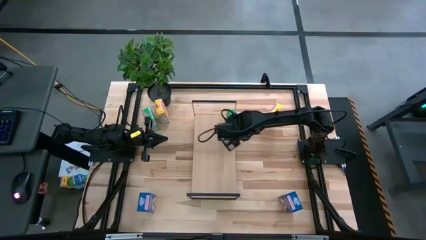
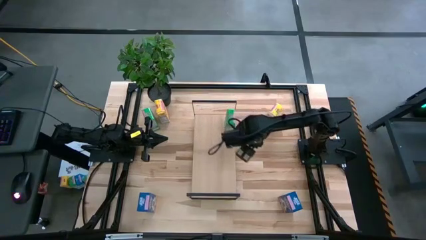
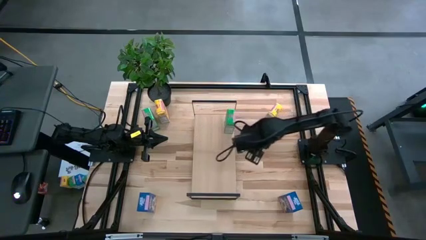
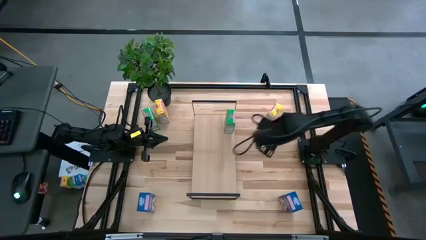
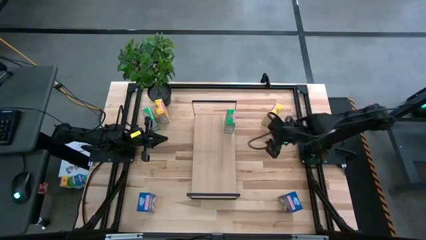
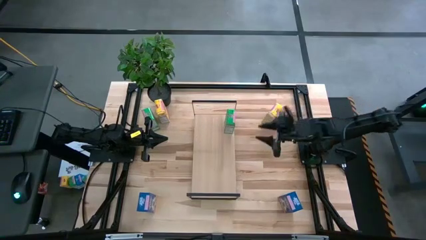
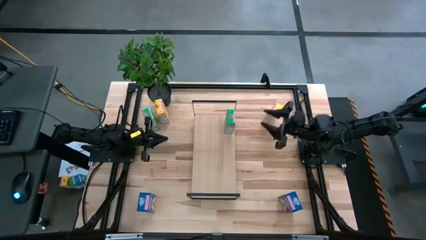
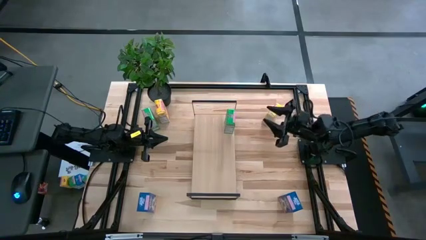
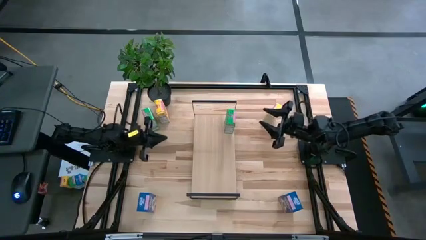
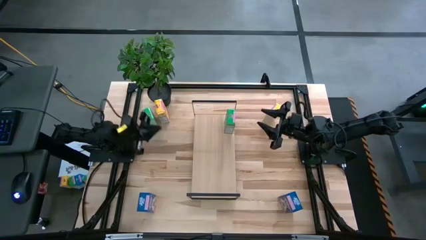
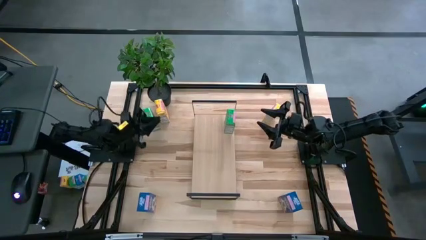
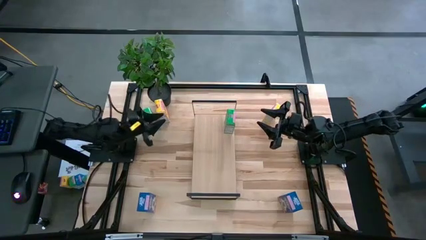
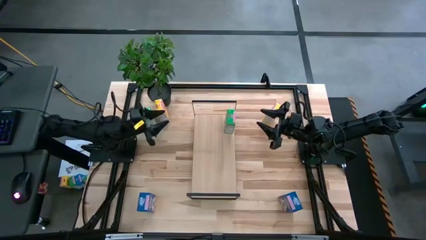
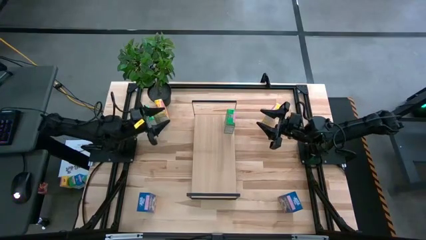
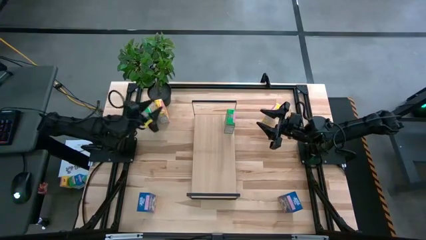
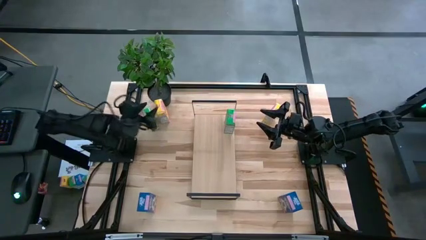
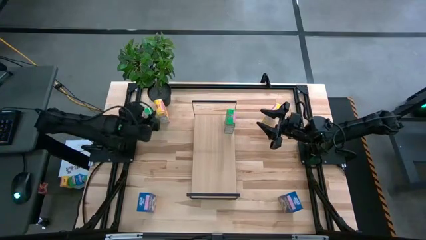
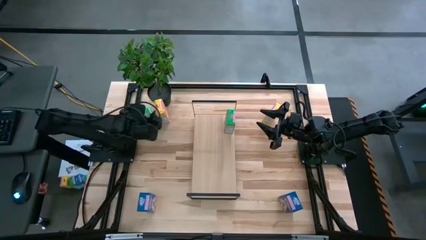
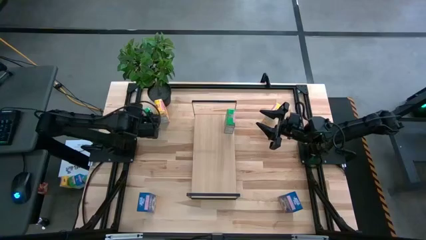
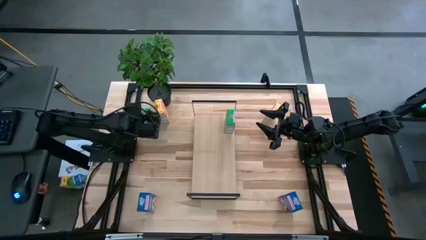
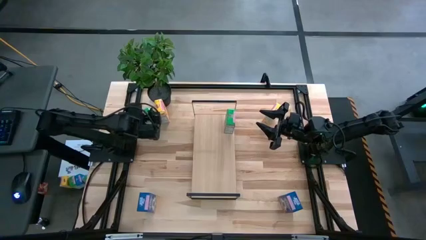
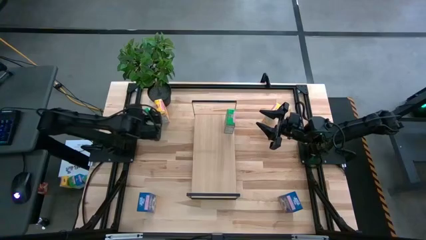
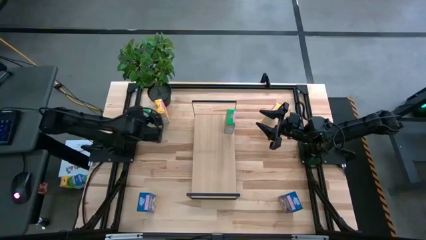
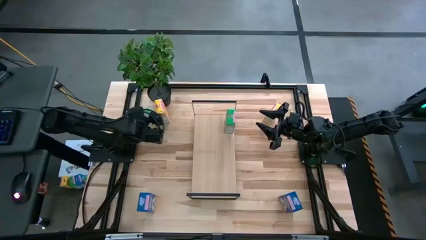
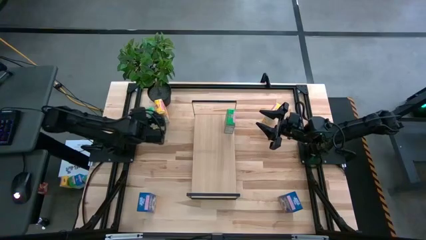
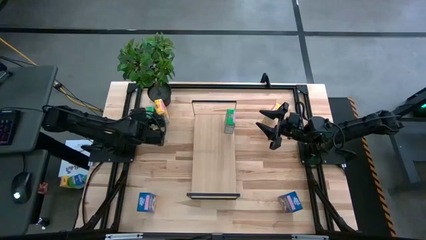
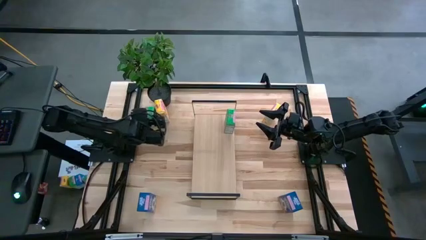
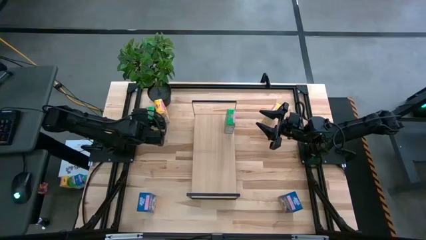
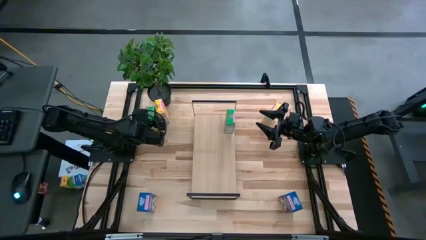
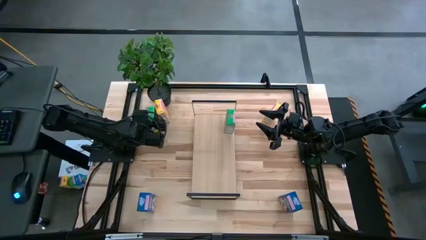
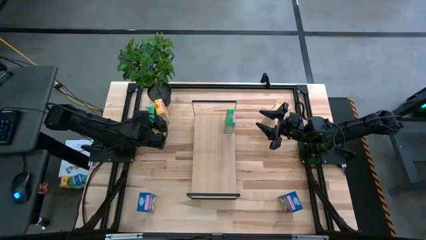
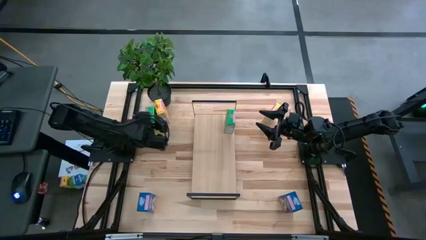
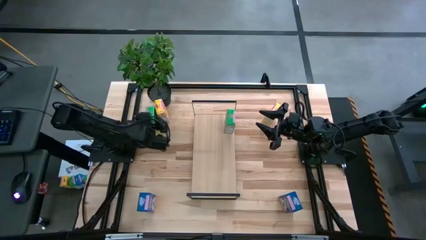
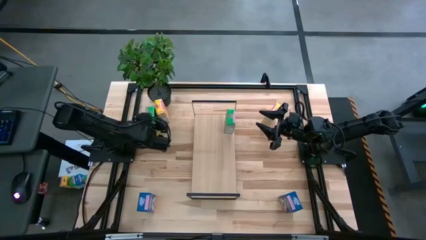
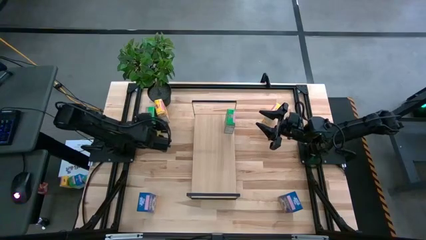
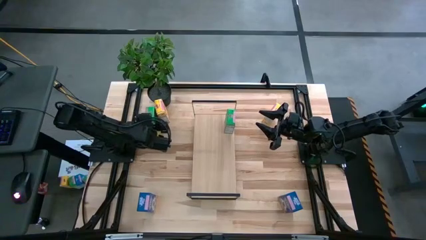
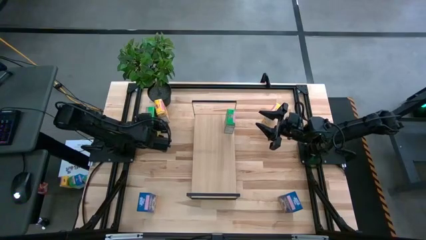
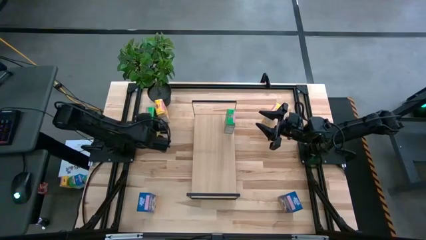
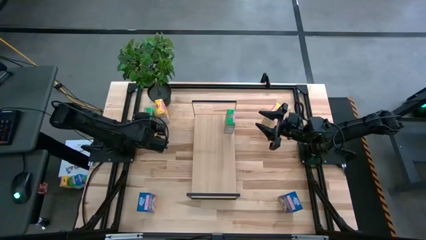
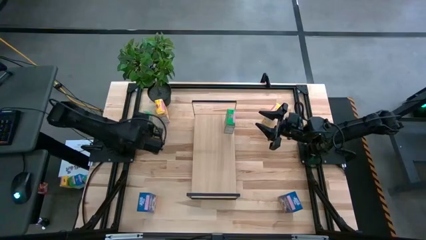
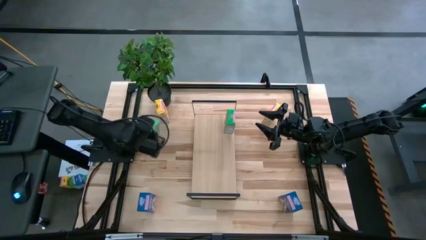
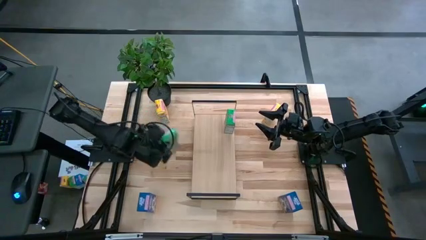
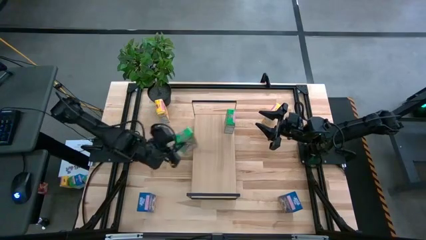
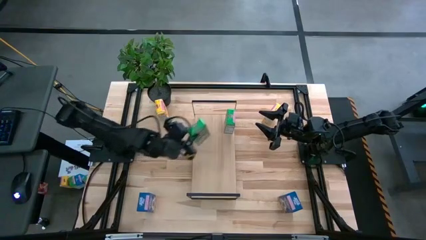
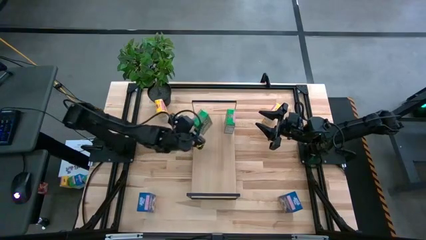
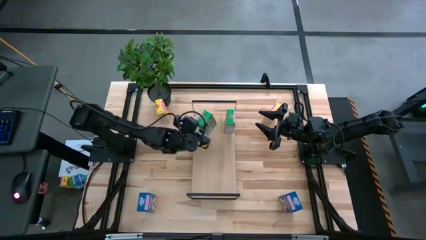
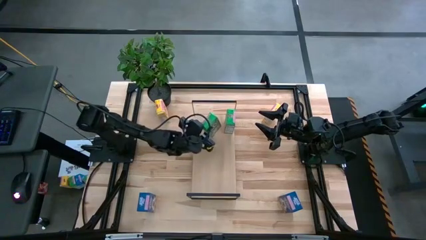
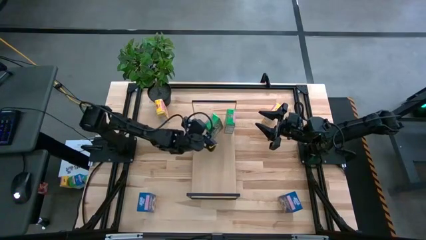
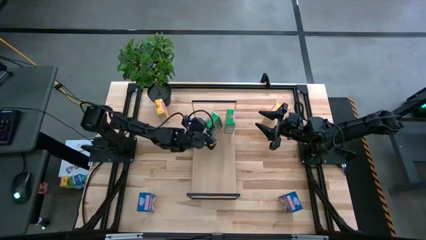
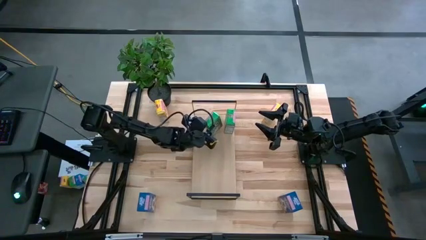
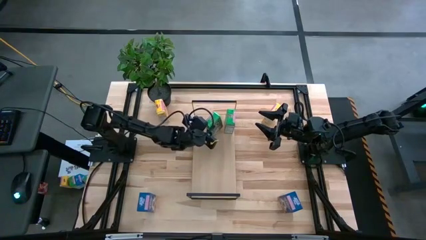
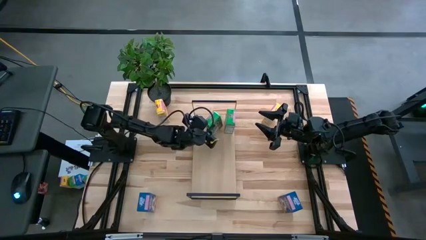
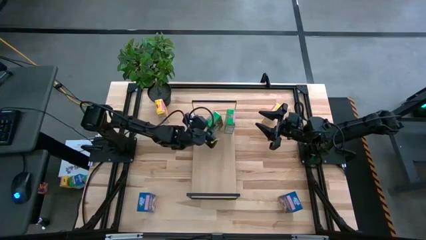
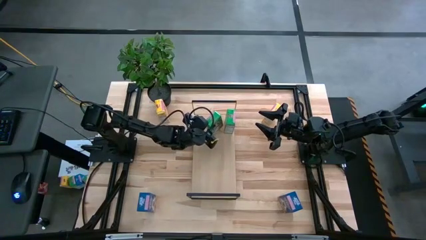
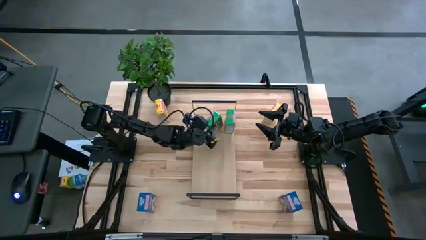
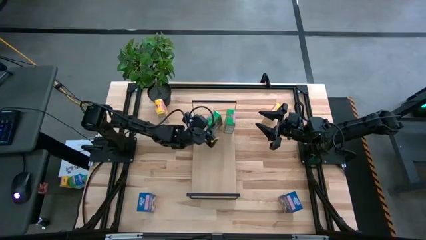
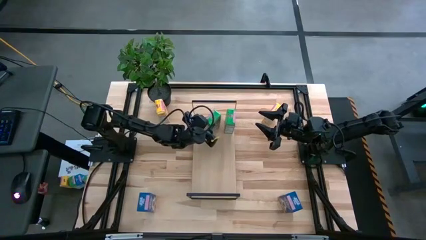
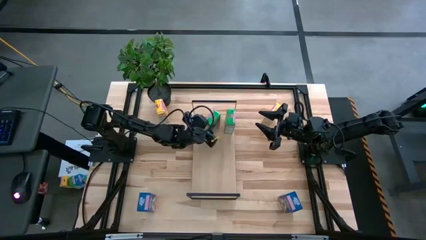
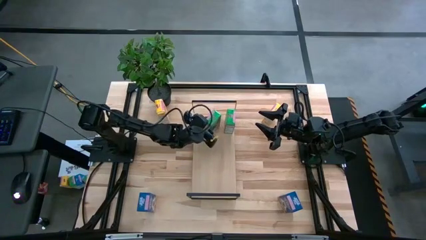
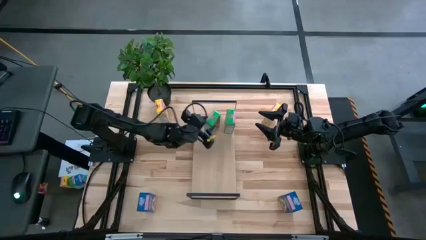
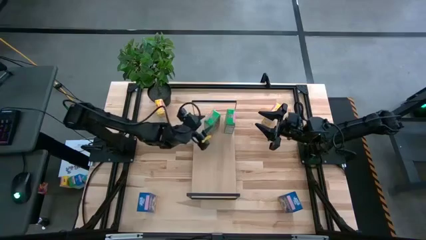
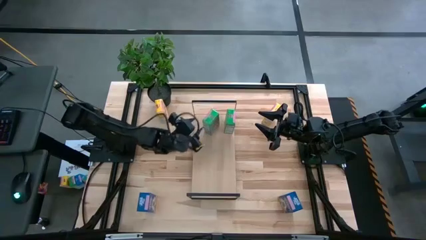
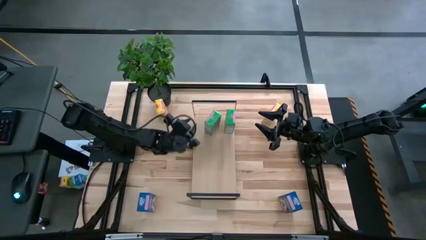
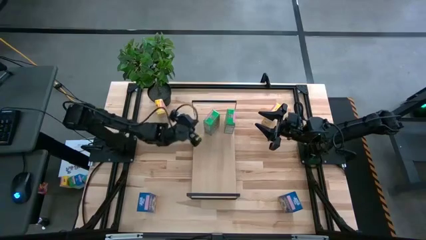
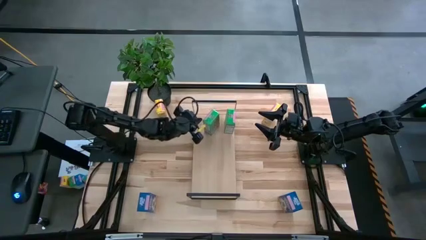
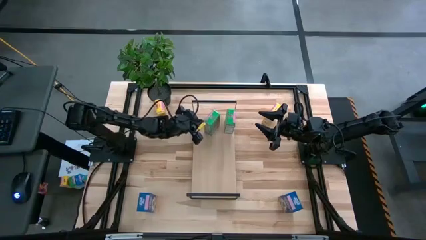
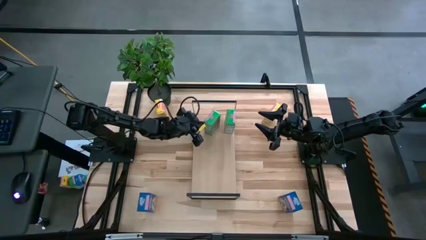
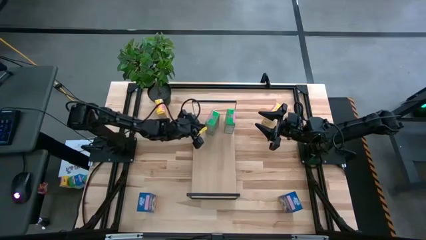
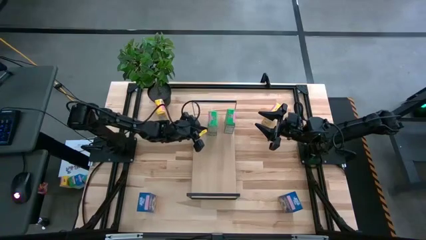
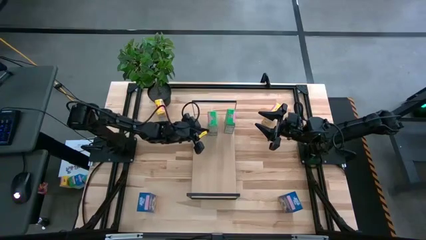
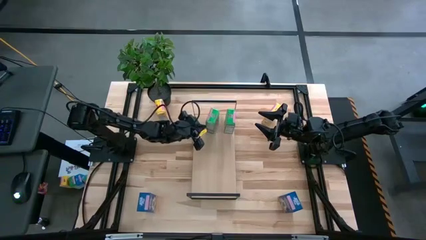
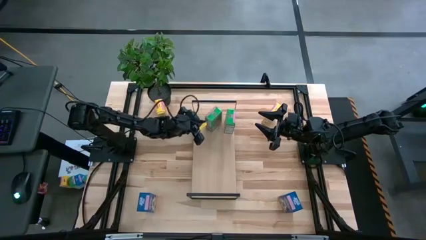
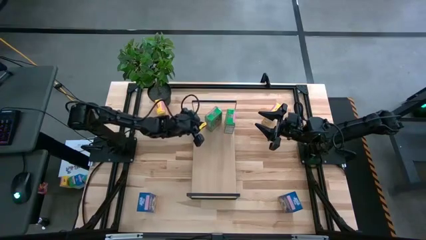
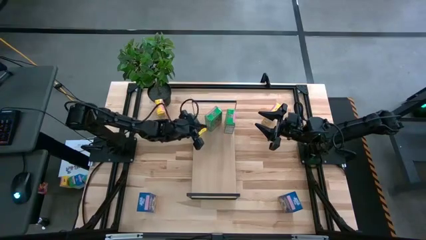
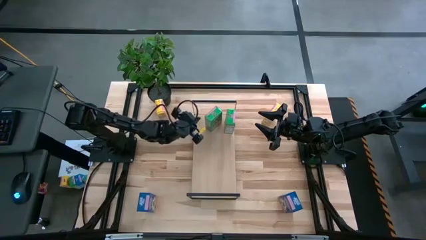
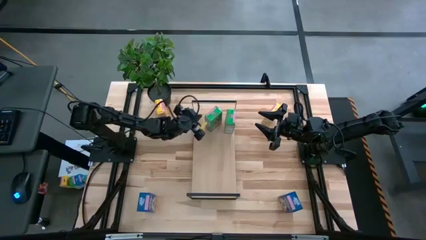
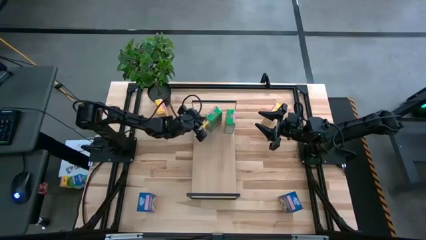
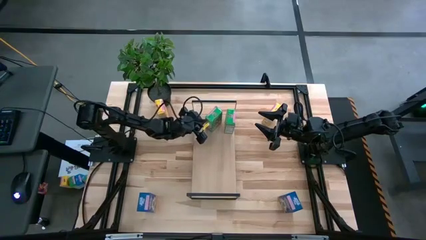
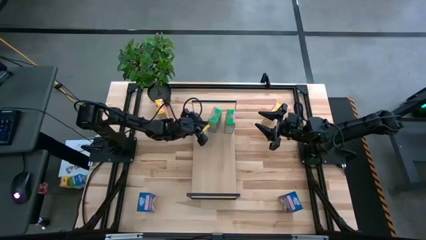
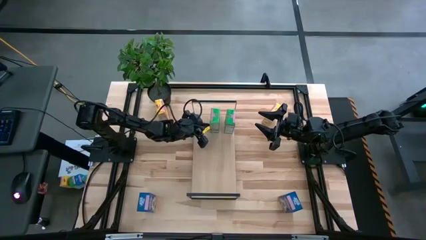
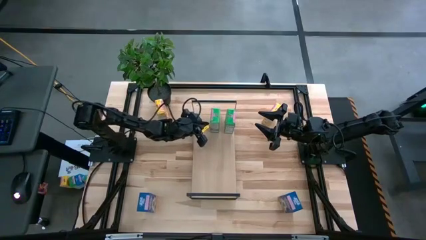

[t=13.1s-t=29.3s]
Task: Stack cereal on shelf
Put the green cereal box aligned with the other green cereal box on the shelf
